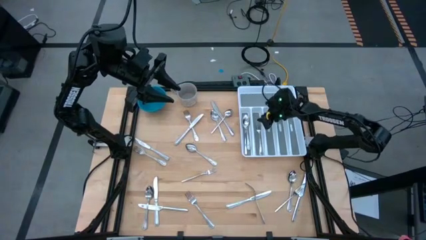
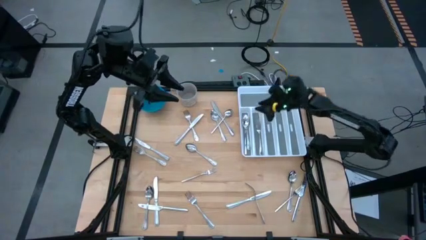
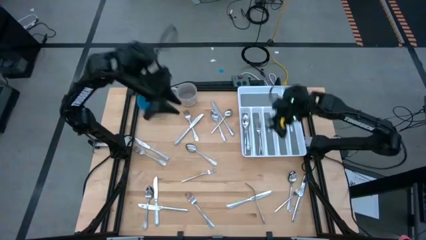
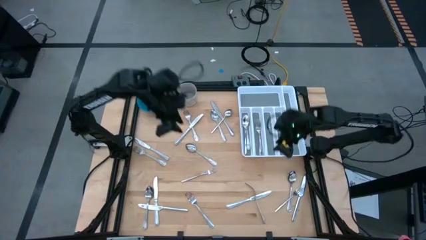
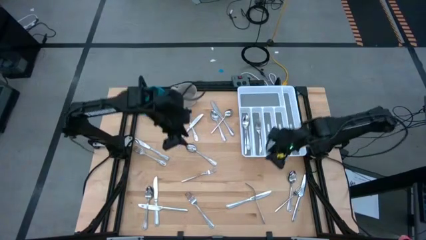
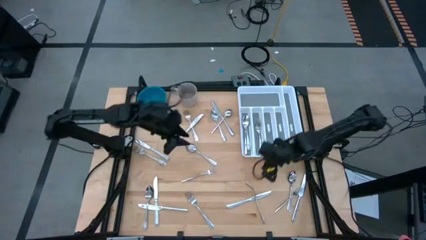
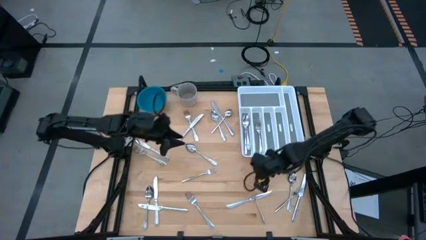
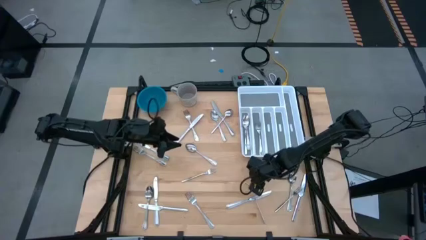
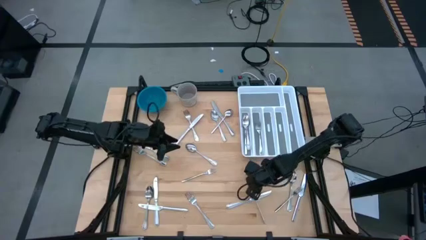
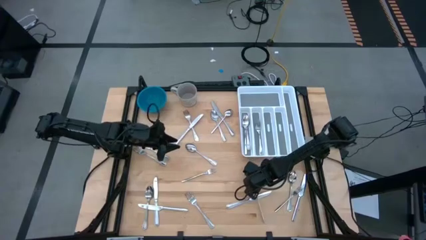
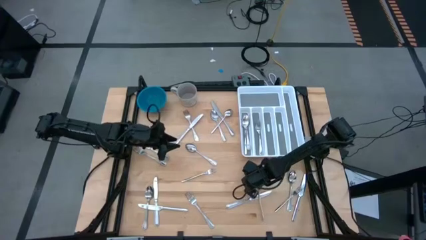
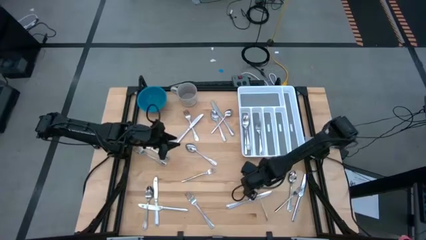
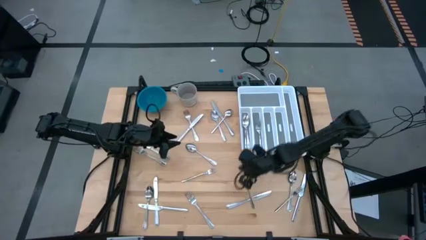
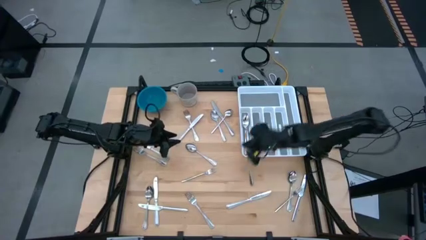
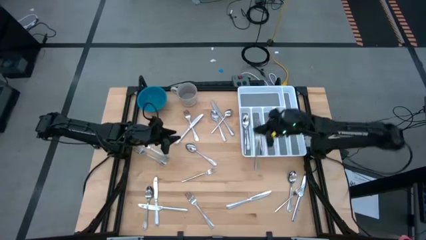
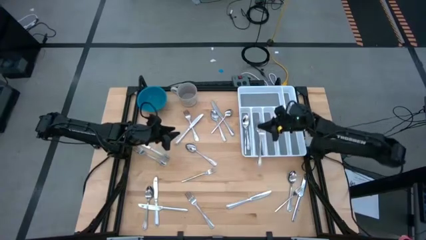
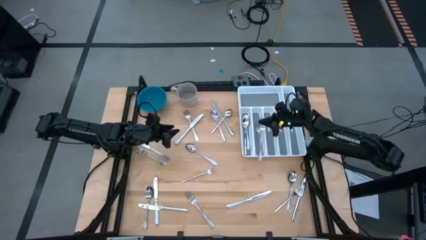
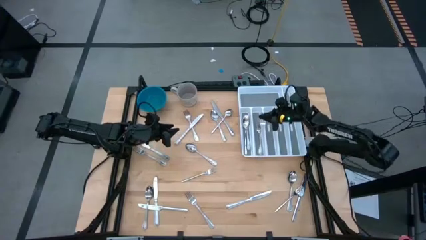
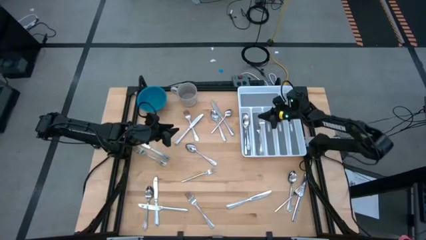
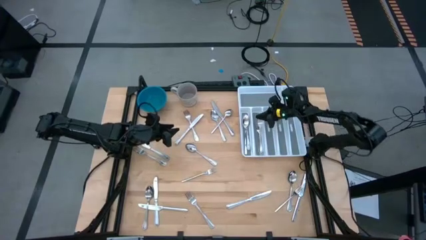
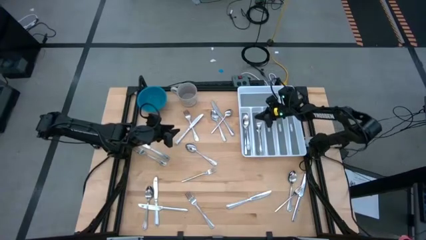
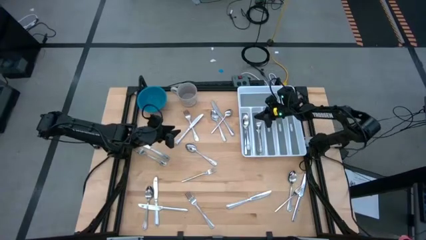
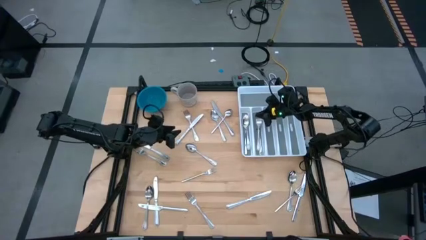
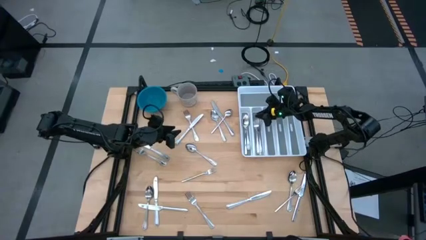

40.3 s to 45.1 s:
Task: Sort silverware
Put the fork in the silverware tray

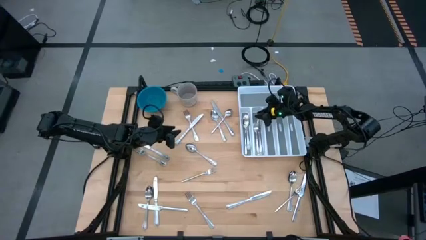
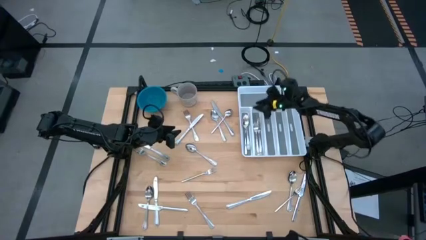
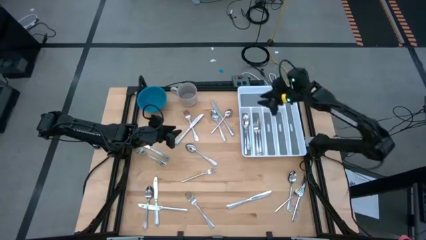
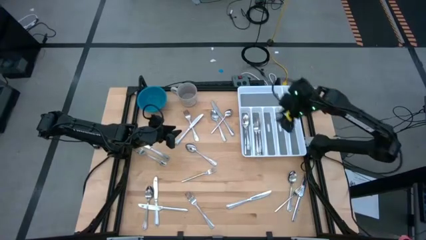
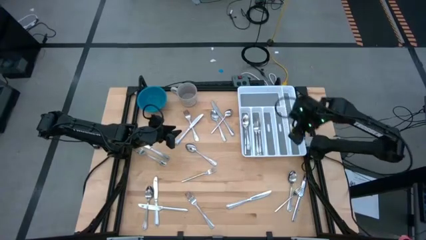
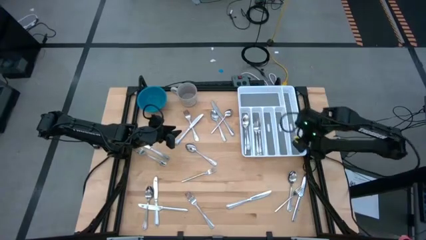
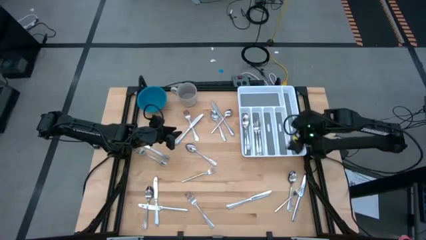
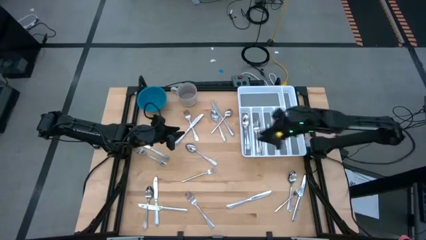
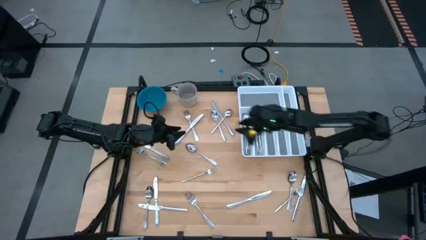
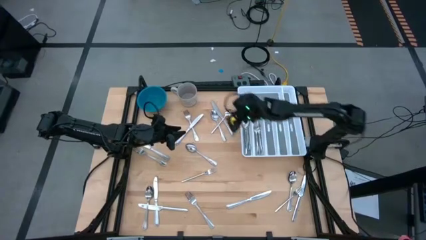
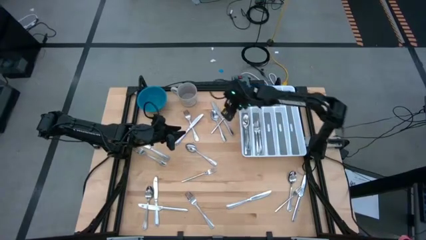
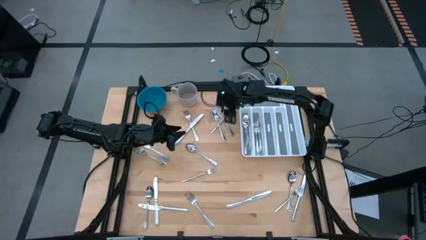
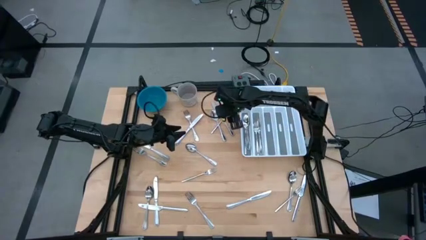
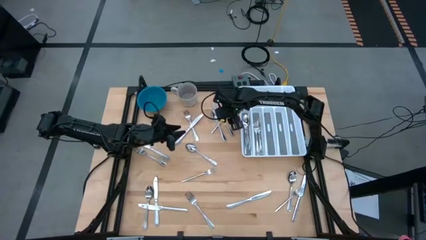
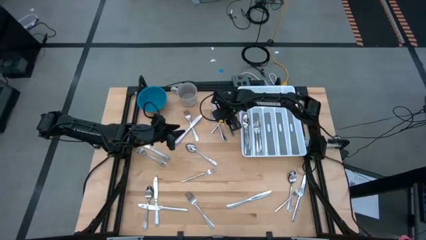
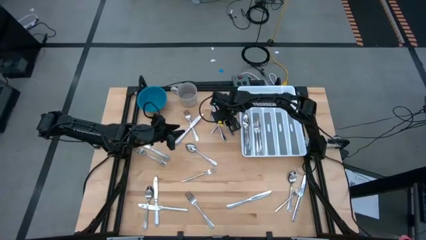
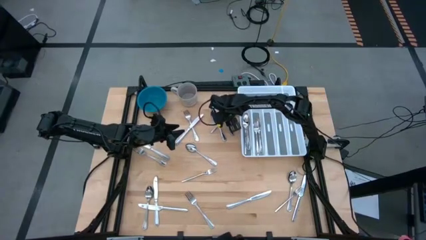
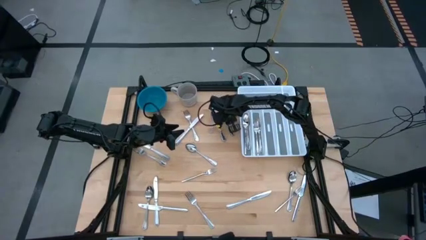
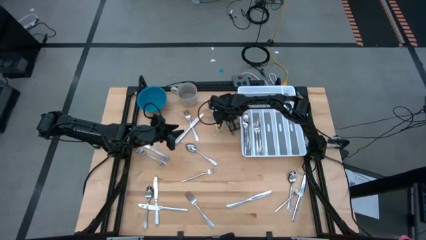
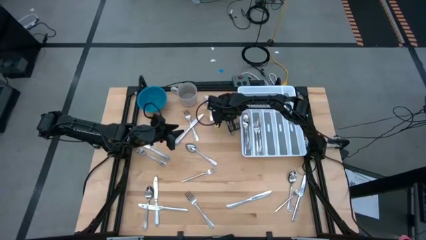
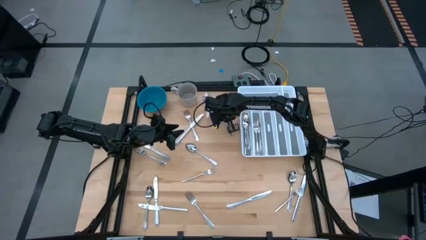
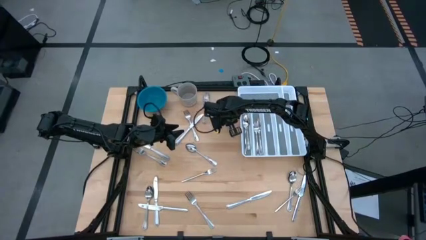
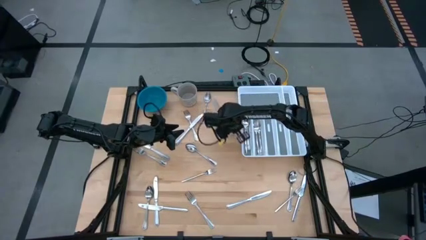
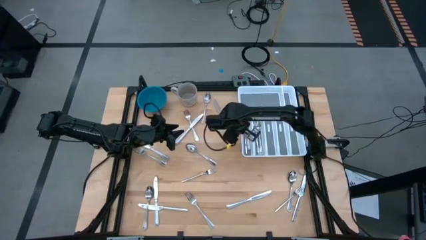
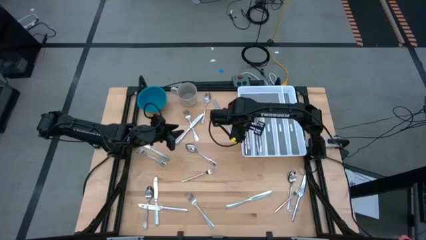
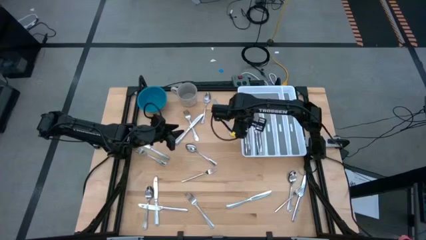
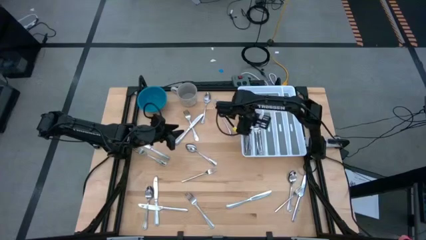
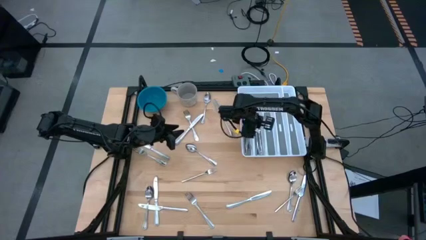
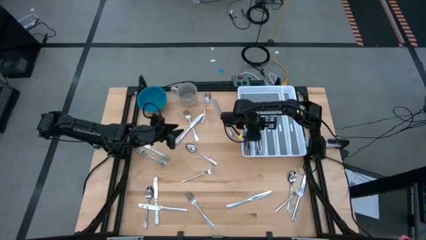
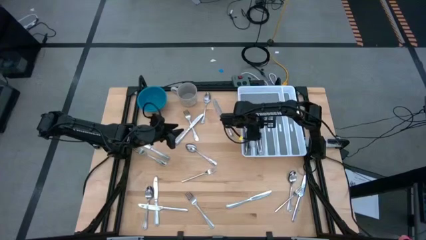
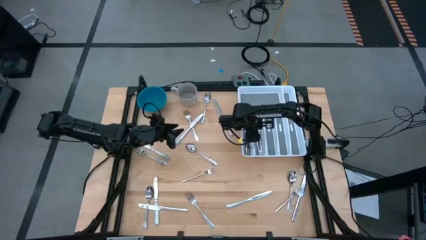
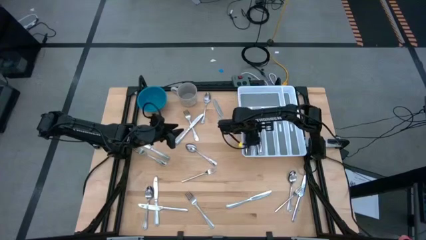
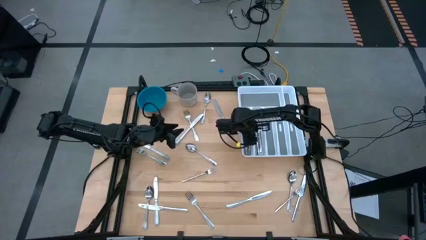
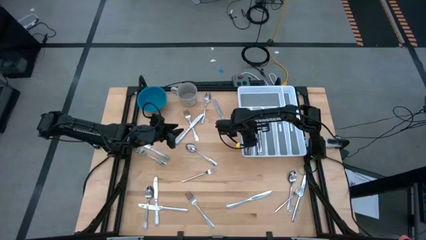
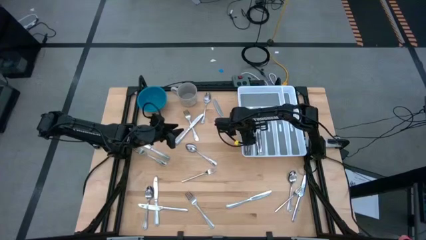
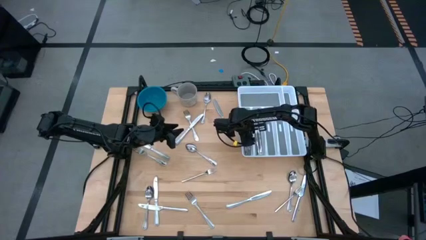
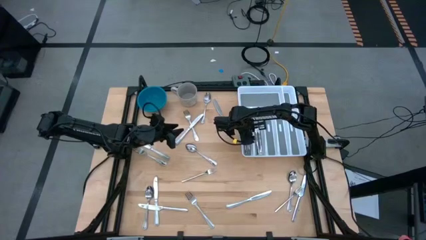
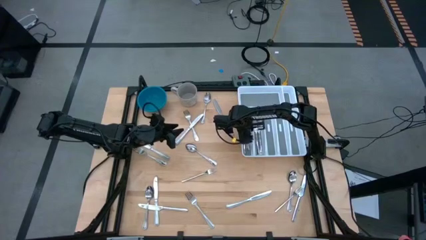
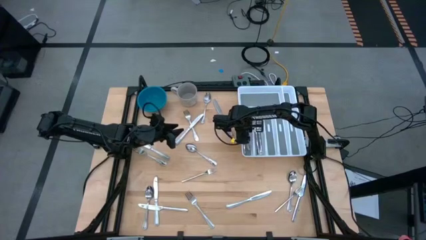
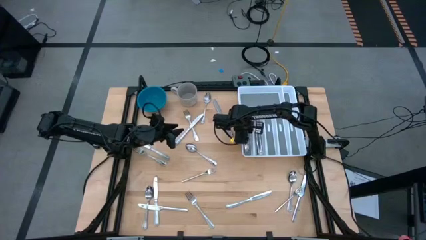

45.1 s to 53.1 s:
Put the spoon in the silverware tray

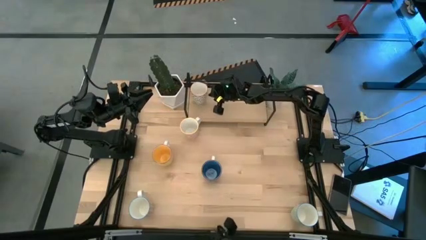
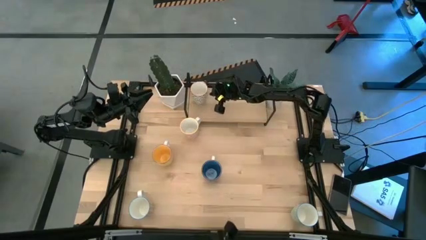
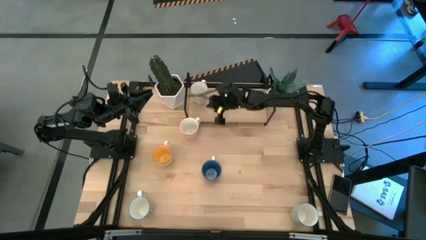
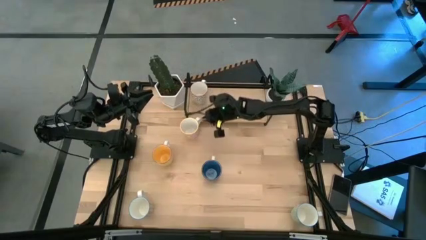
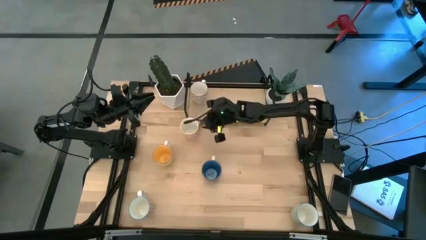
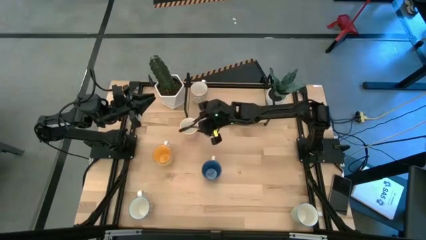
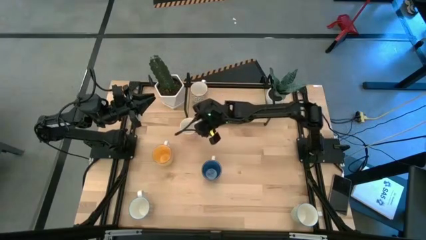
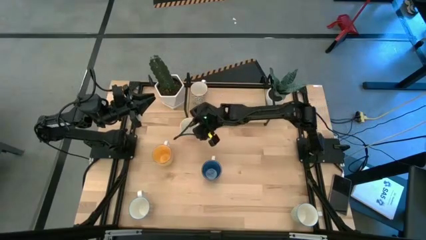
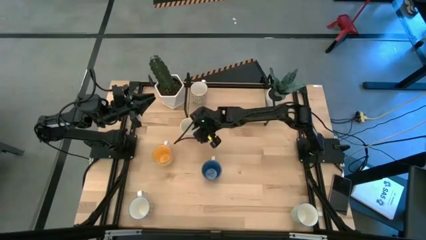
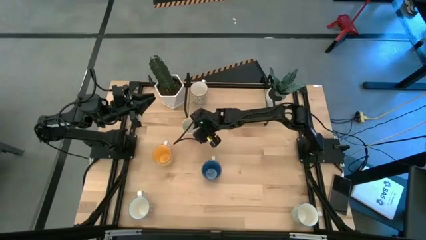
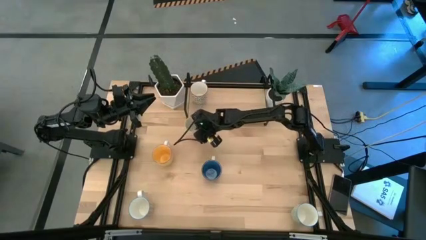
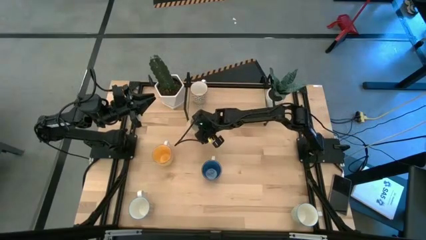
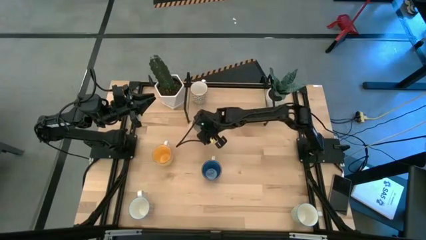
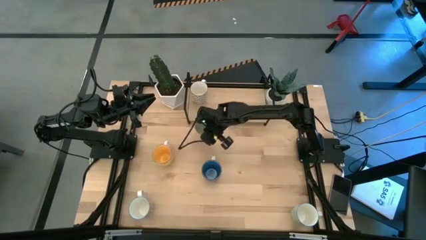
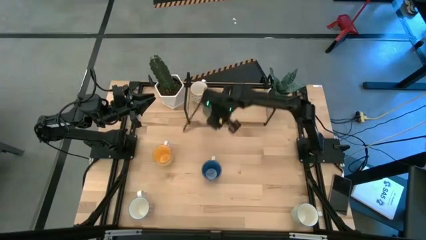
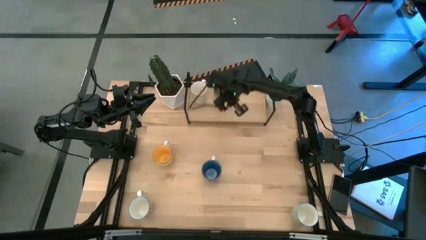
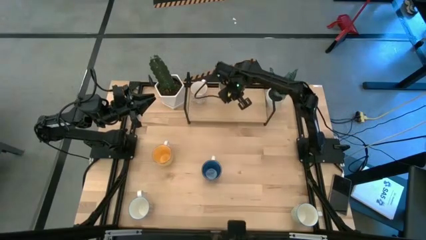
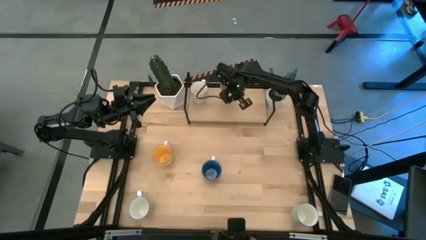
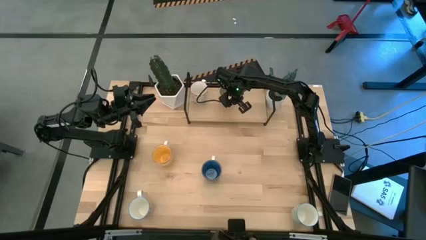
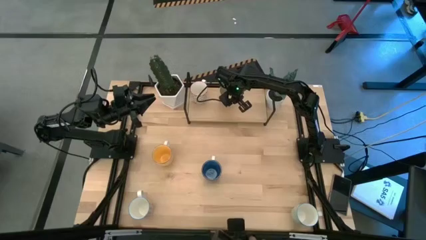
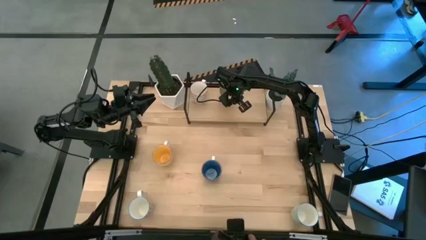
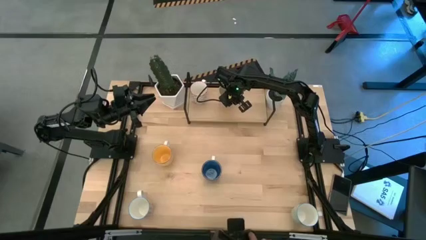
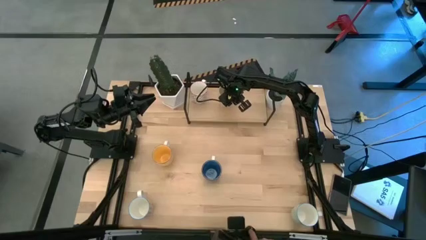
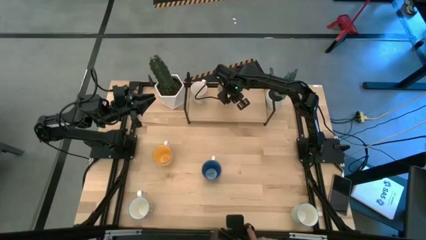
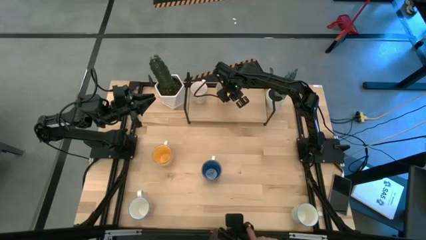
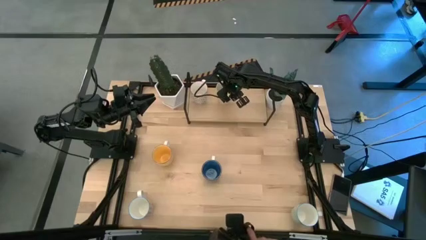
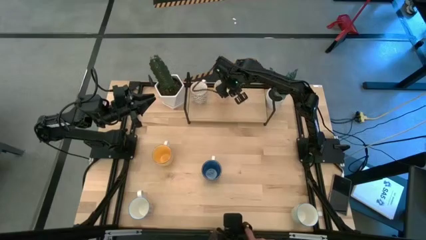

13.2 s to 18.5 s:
Task: Place coffee mugs
Put the orange patterned mug on the shelf
